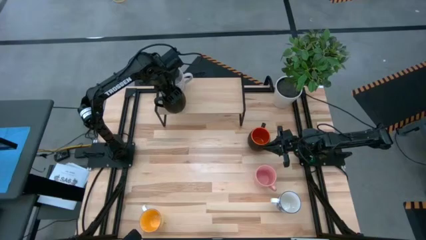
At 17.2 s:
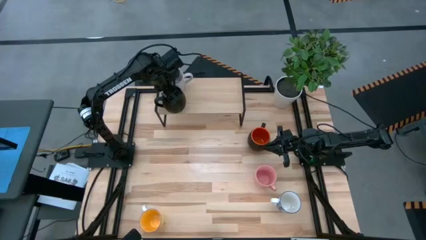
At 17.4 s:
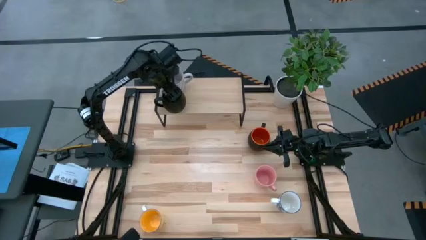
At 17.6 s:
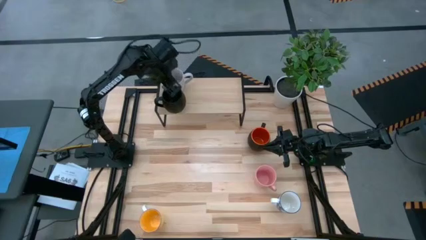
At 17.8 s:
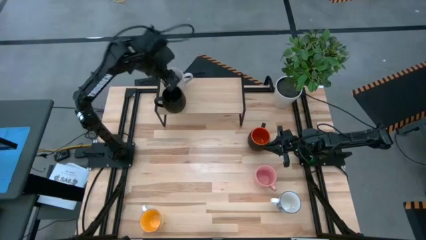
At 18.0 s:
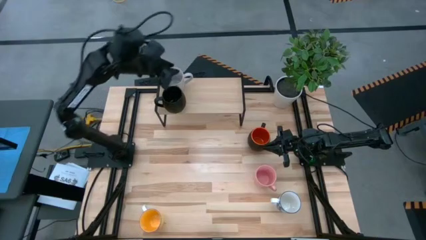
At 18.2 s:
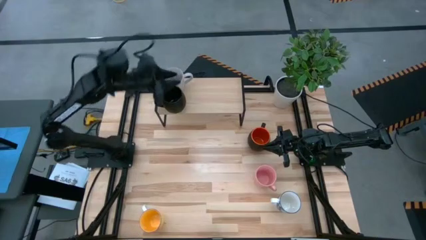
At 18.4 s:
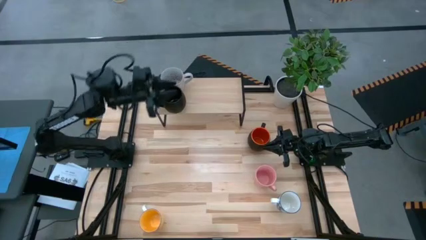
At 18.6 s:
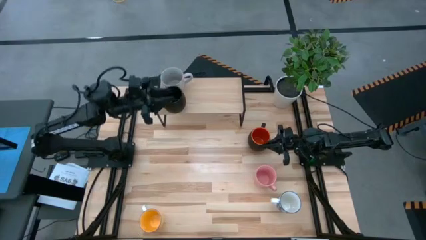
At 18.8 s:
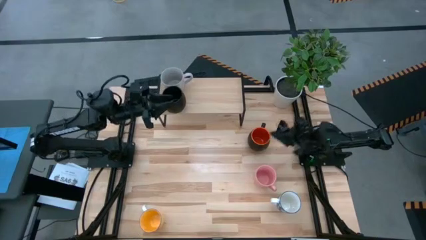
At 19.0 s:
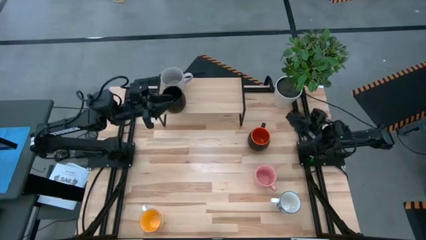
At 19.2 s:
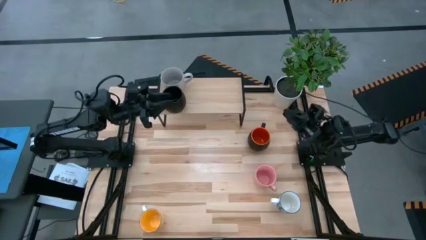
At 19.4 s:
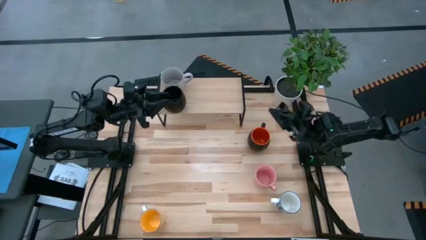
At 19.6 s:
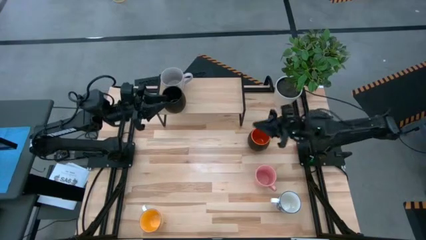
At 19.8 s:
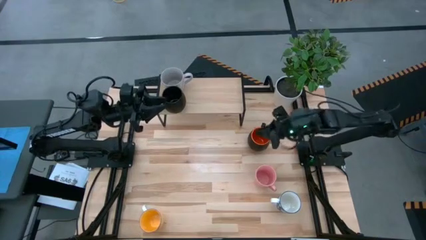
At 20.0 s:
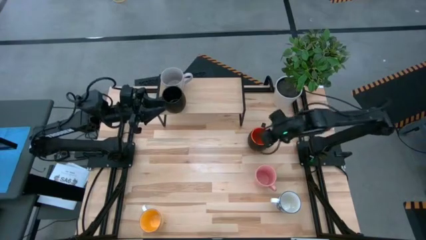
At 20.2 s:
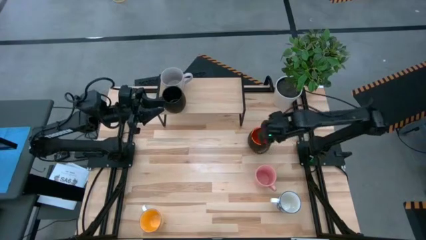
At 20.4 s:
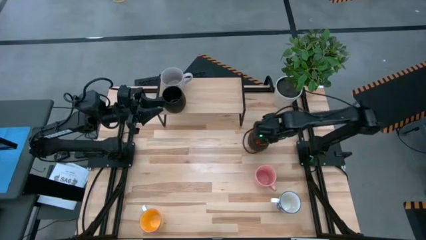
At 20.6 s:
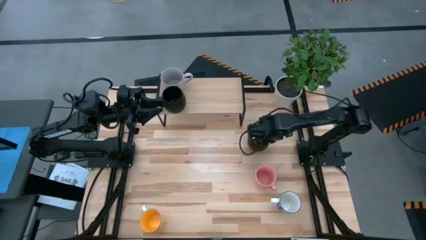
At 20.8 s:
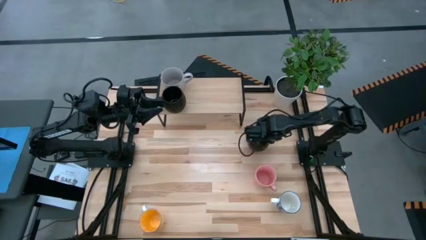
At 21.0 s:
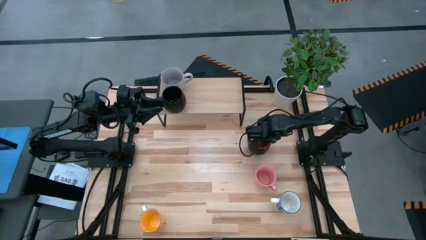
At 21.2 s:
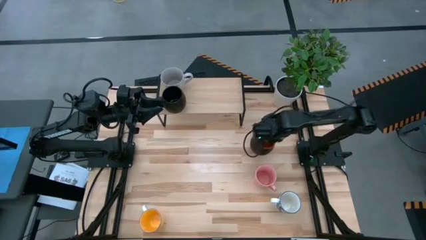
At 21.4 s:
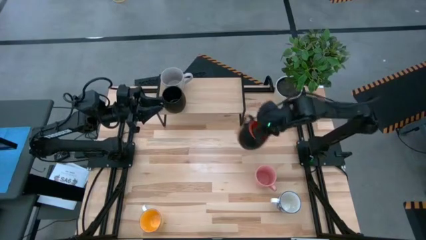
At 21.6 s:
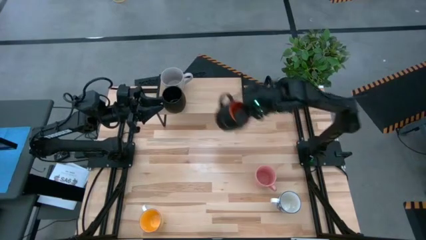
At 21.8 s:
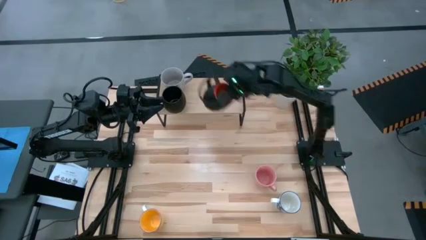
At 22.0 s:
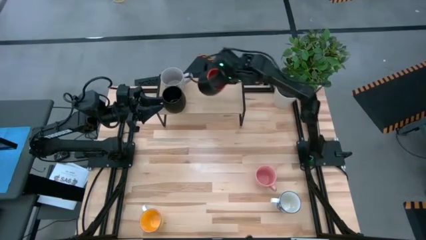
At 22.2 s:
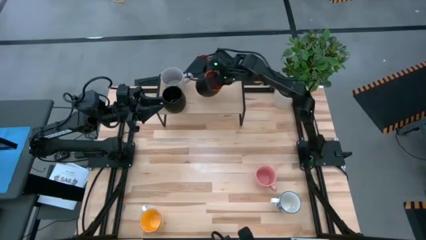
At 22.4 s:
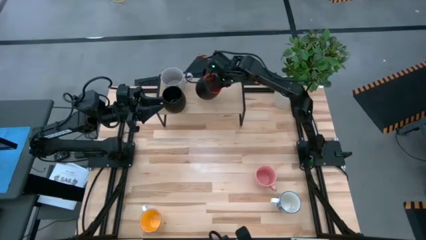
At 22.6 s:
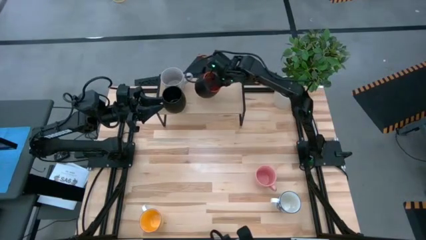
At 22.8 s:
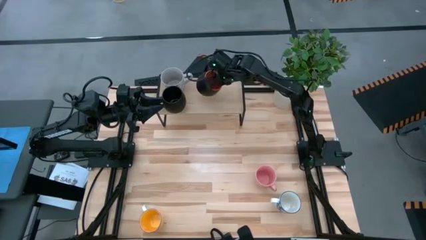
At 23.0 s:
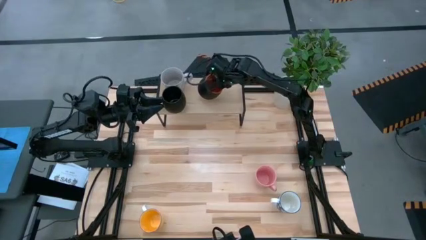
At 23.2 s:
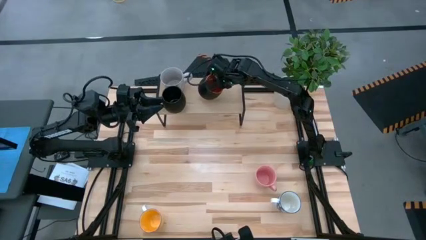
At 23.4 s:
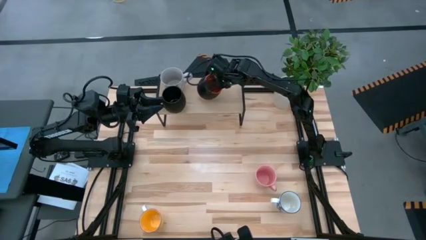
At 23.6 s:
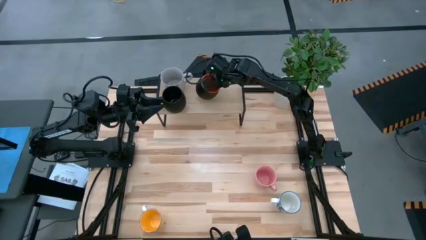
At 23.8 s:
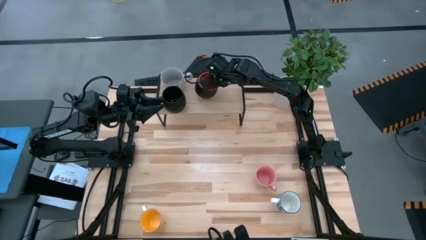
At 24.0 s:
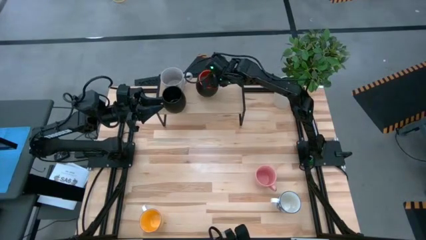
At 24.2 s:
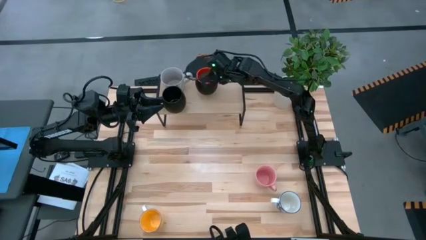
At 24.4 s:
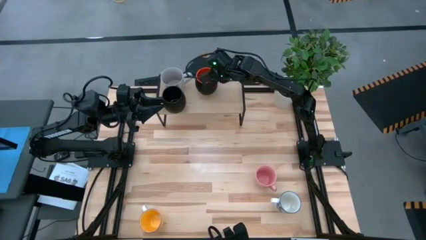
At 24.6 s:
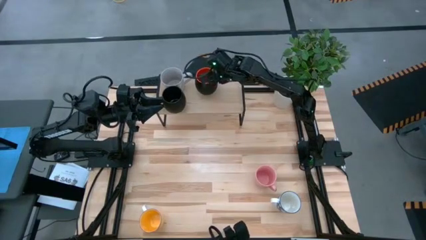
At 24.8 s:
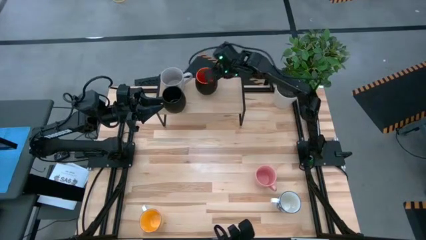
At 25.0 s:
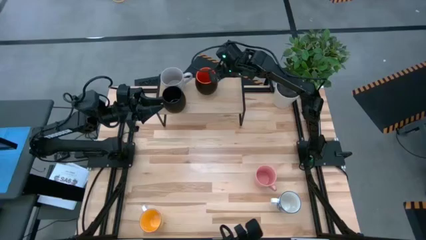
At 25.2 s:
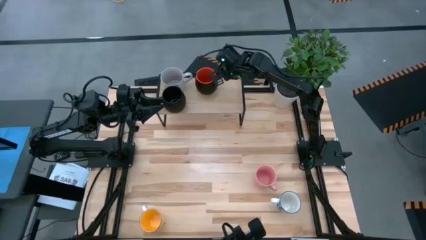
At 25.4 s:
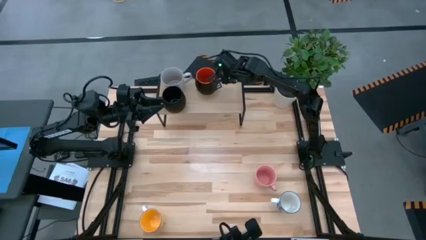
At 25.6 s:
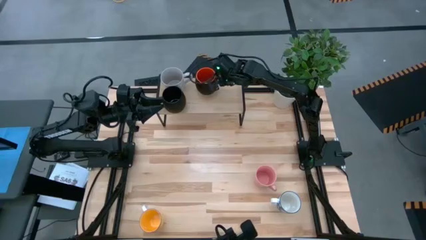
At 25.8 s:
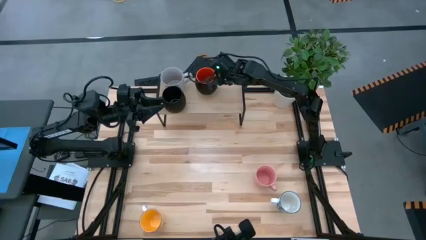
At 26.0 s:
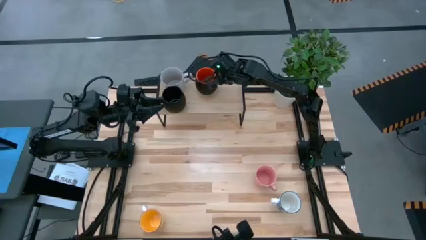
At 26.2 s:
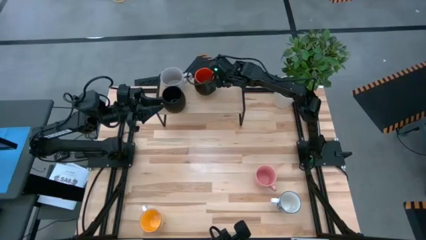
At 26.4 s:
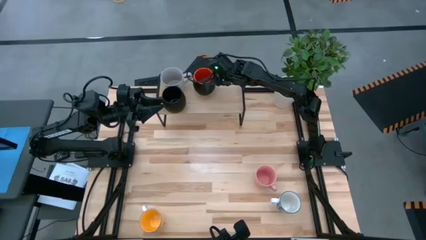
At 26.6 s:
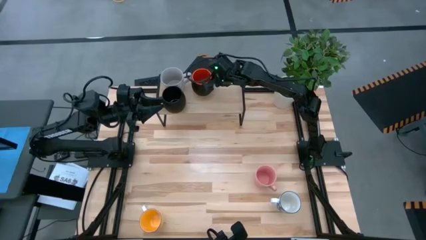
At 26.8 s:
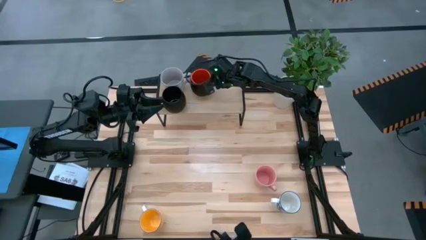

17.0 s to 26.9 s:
Task: Place coffee mugs
Put the black and orange cup on the shelf

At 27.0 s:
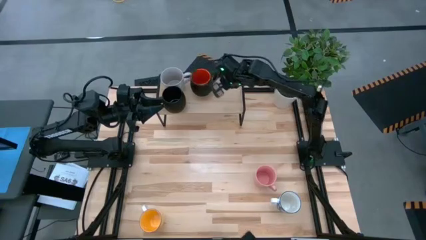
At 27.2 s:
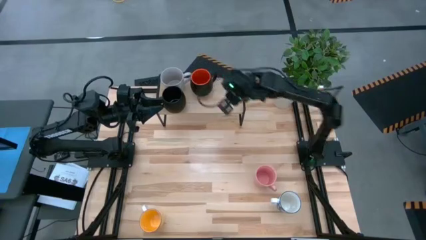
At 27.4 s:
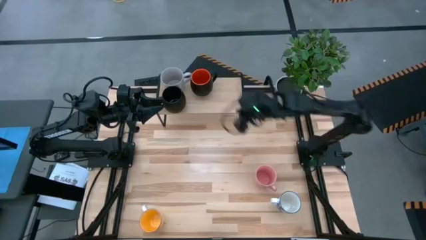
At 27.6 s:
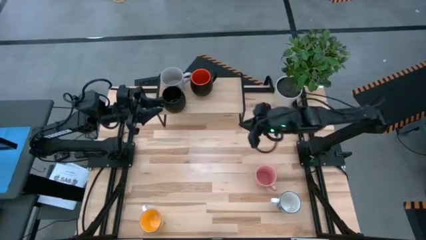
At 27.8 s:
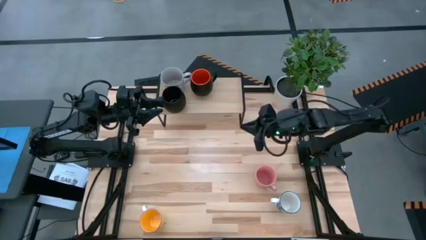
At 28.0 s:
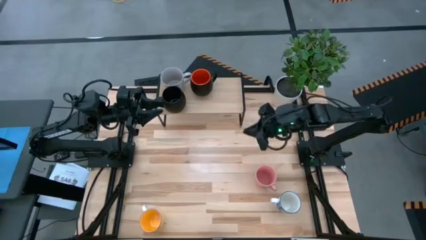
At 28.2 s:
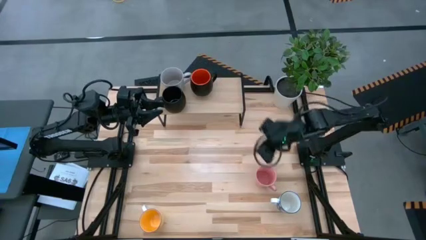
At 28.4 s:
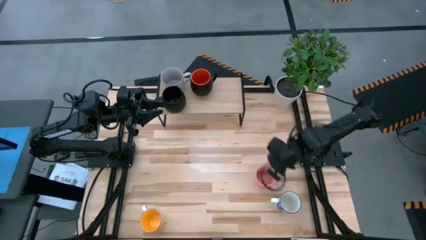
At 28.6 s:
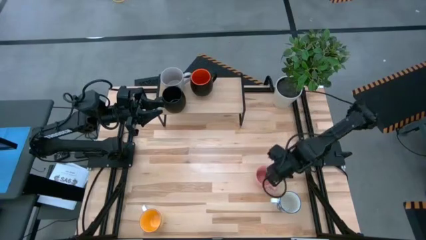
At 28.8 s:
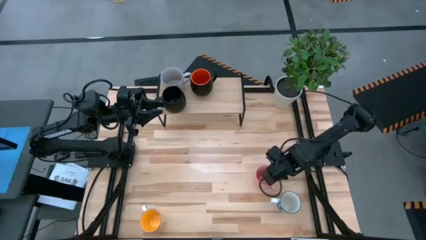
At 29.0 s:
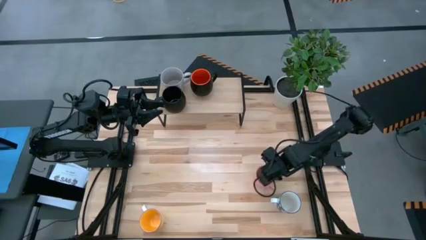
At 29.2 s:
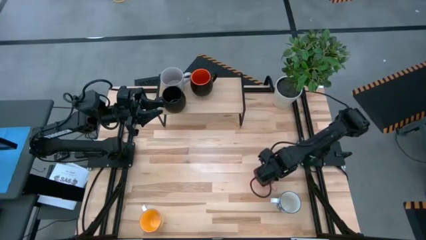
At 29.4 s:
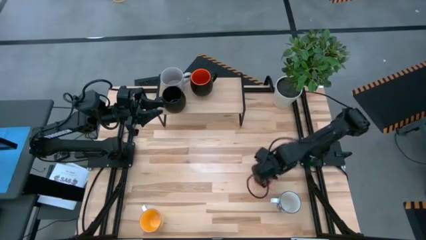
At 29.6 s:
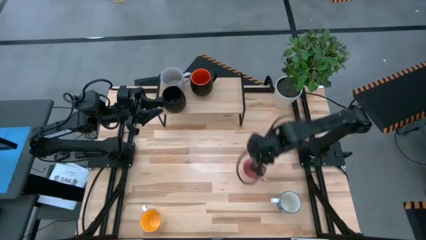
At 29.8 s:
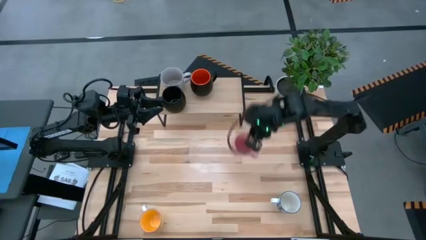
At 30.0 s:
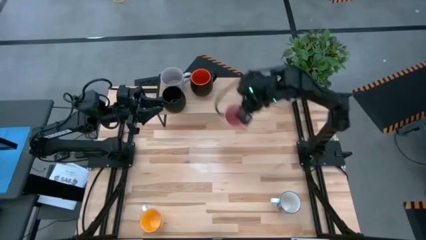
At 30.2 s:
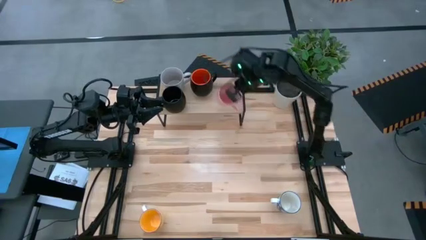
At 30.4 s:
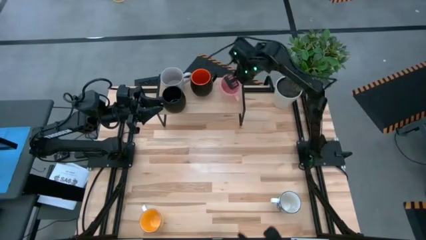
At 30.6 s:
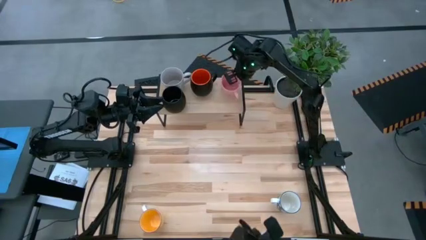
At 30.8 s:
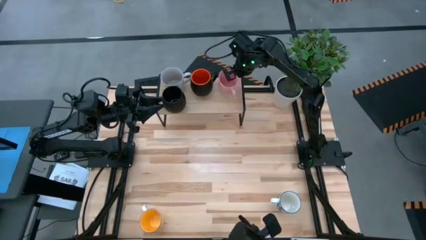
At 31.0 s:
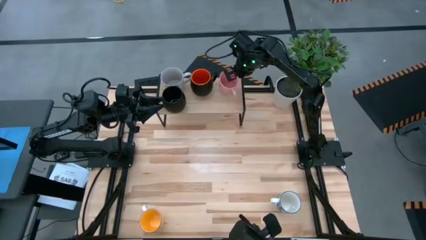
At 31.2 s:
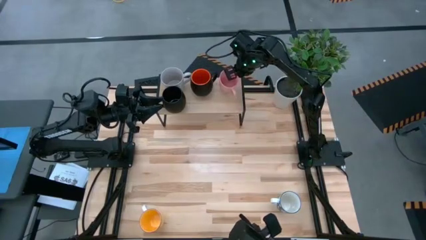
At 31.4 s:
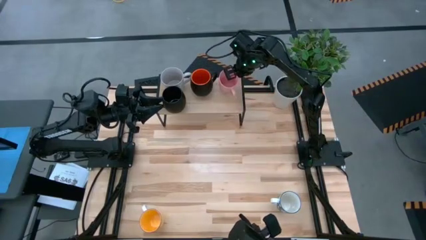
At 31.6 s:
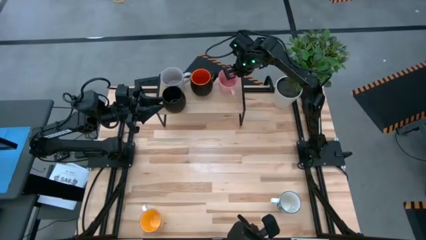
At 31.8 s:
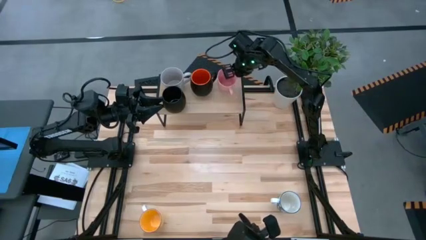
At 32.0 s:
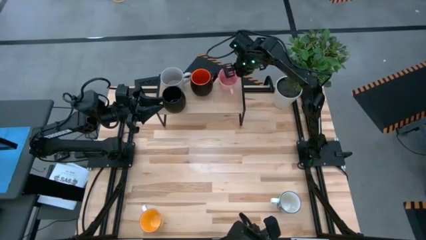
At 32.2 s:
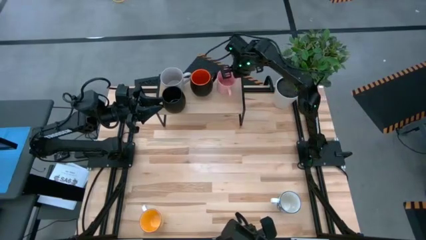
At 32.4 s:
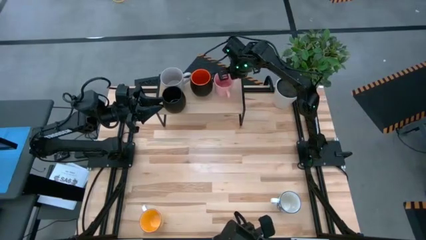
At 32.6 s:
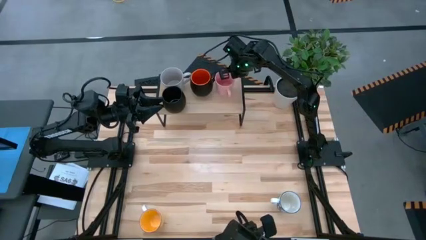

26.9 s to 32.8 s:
Put the pink cup on the shelf
